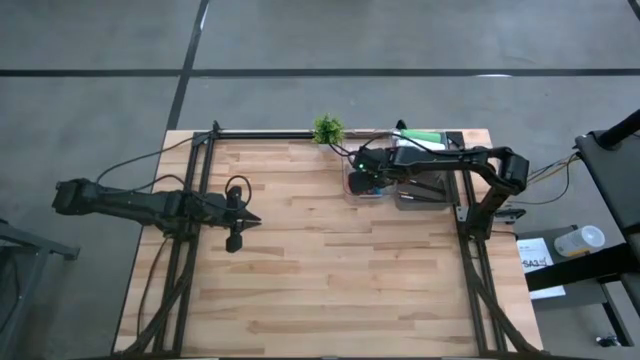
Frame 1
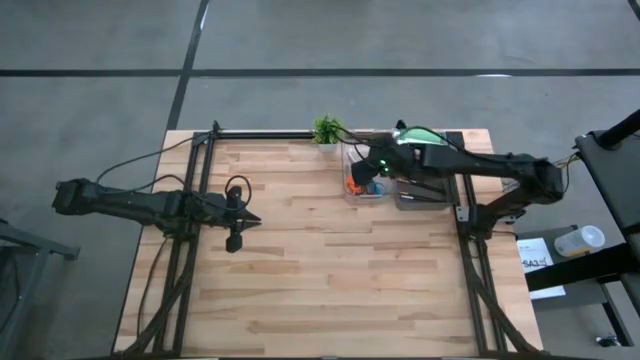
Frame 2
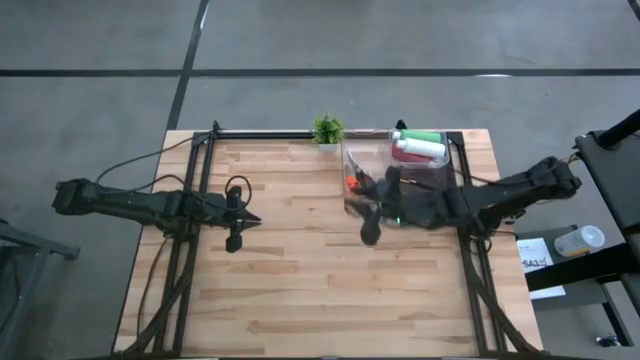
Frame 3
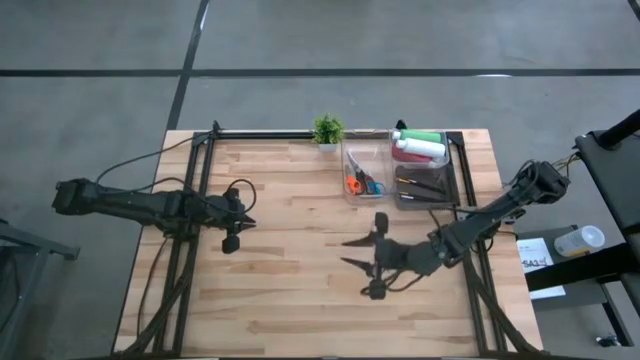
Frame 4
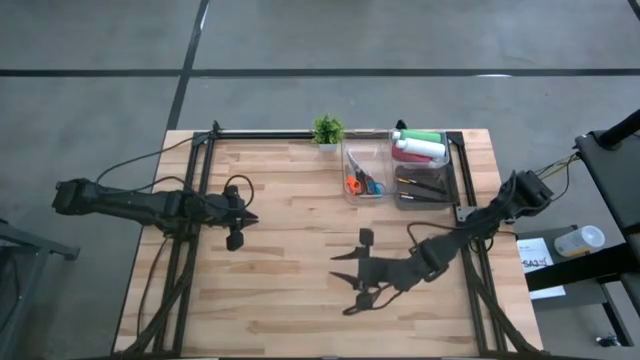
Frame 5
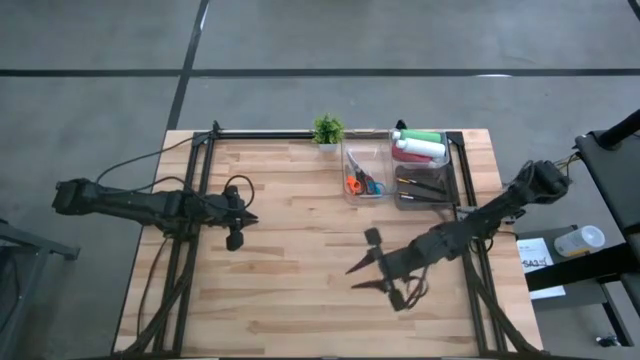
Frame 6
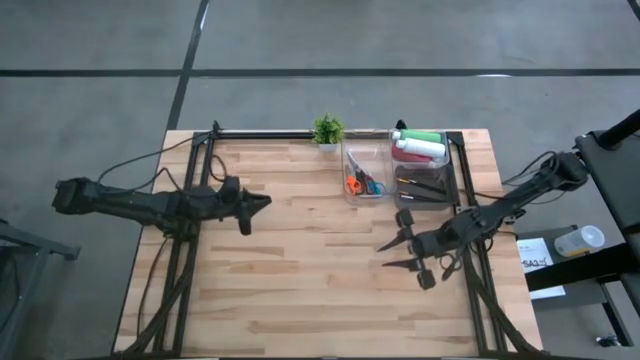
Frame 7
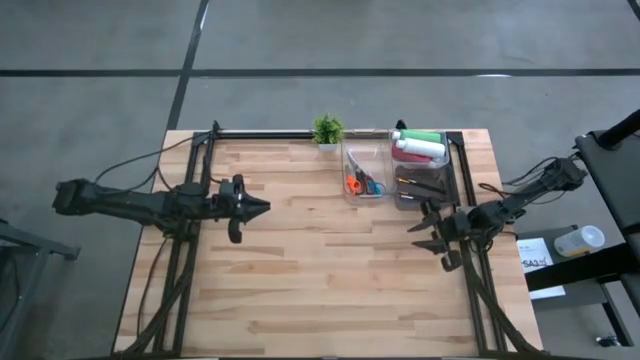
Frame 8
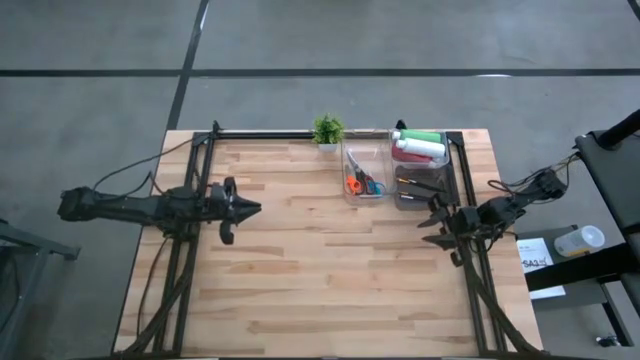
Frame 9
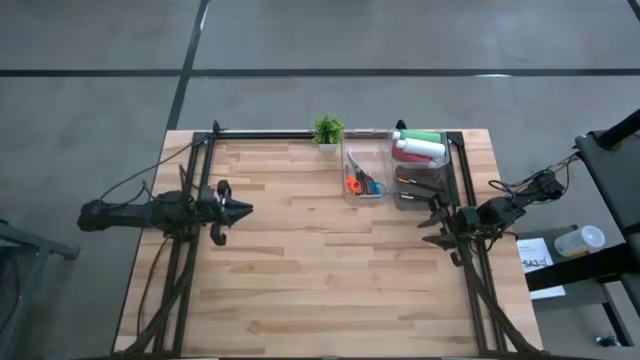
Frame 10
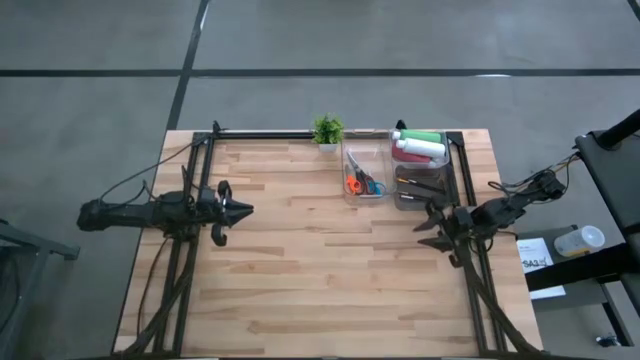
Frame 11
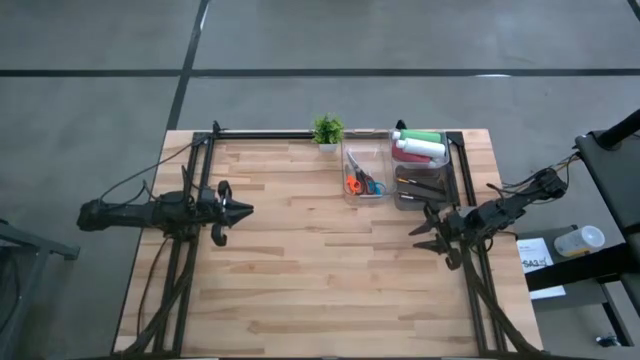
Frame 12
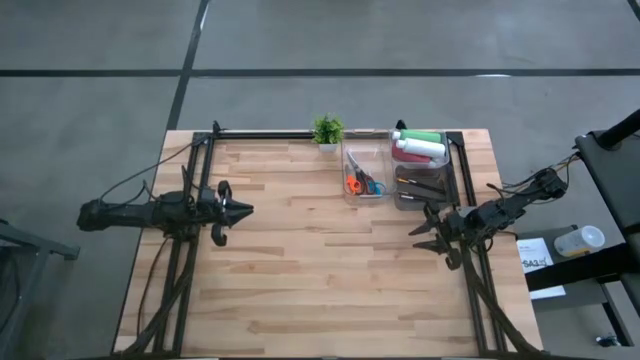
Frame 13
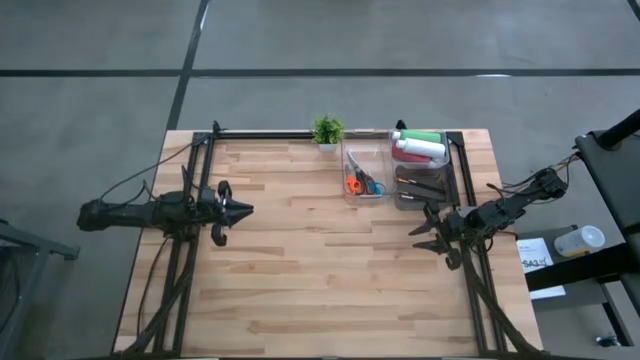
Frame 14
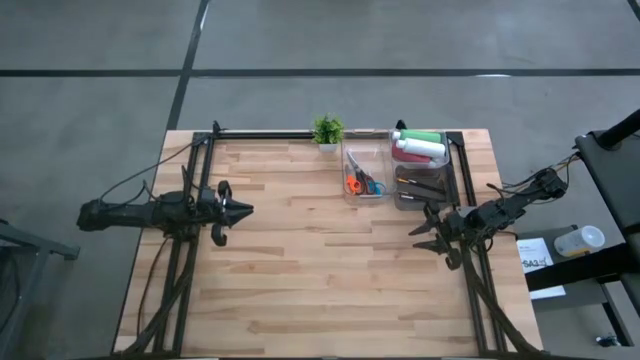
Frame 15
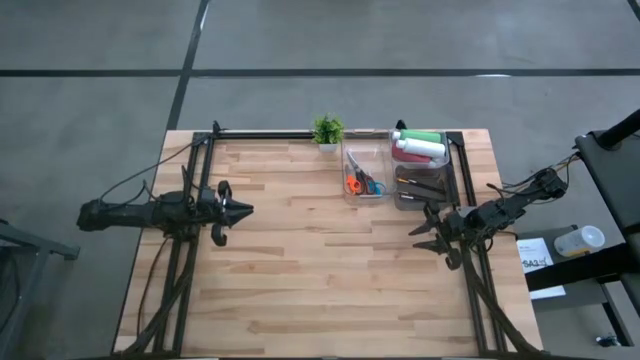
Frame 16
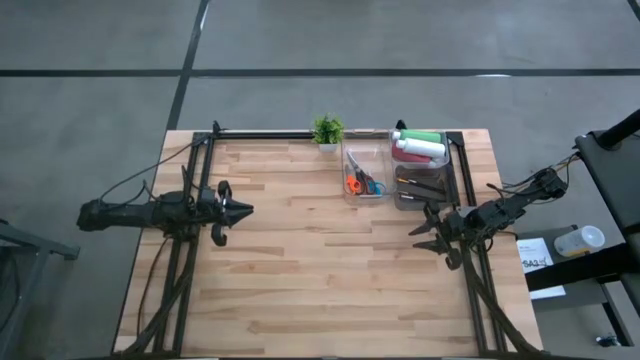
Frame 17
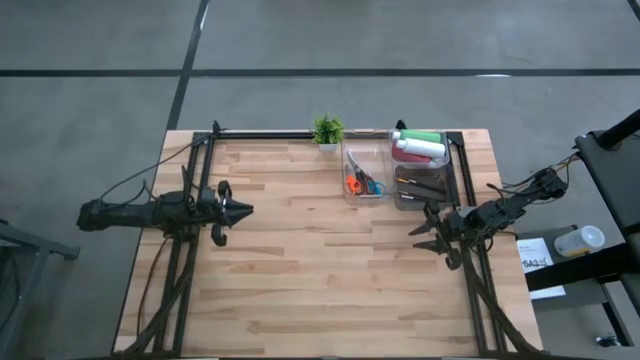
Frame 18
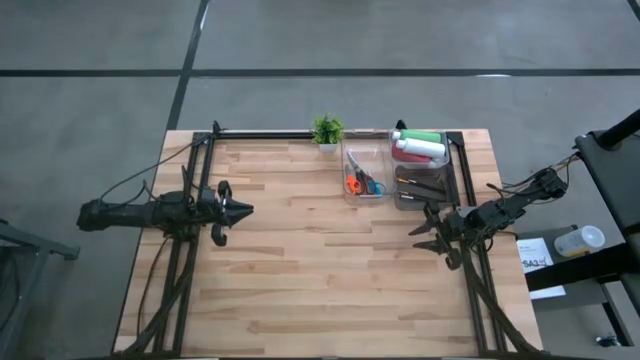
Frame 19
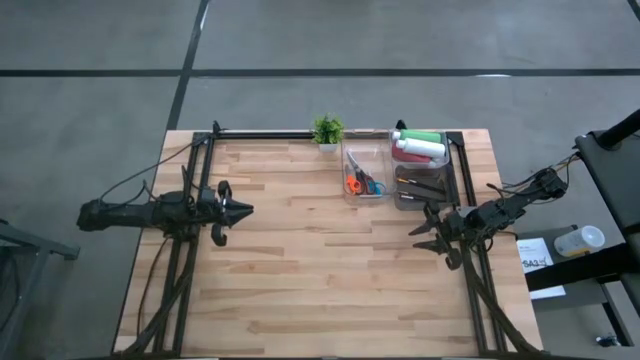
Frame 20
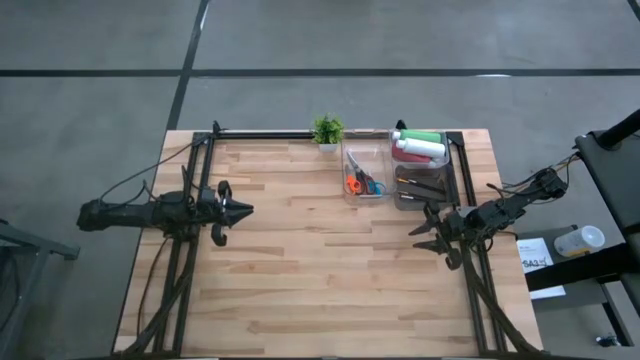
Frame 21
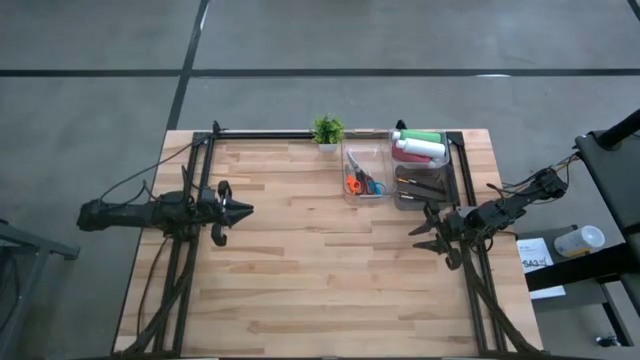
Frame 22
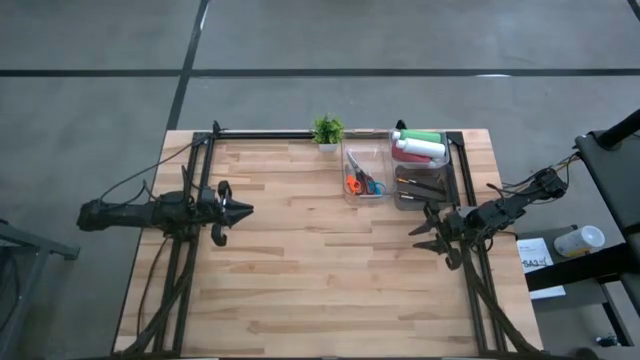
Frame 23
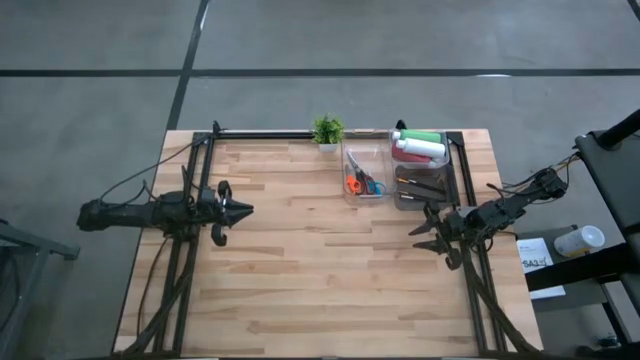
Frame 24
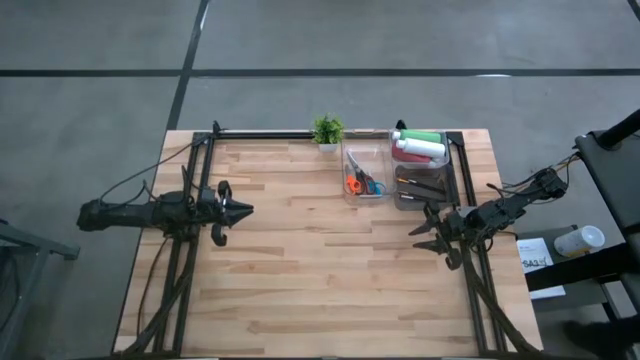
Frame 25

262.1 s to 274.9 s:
Task: Pick & Place Paint Supplies
Return to Home Position

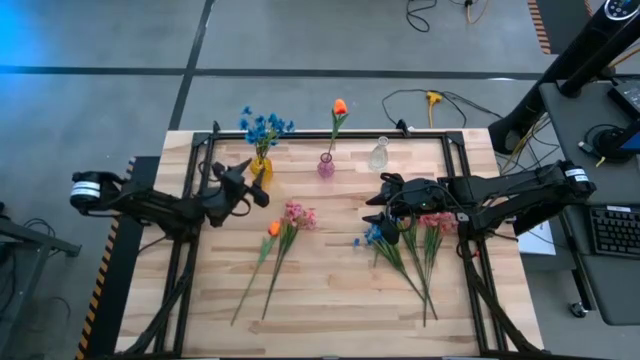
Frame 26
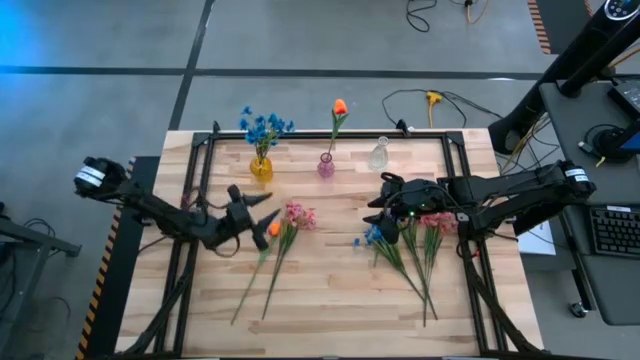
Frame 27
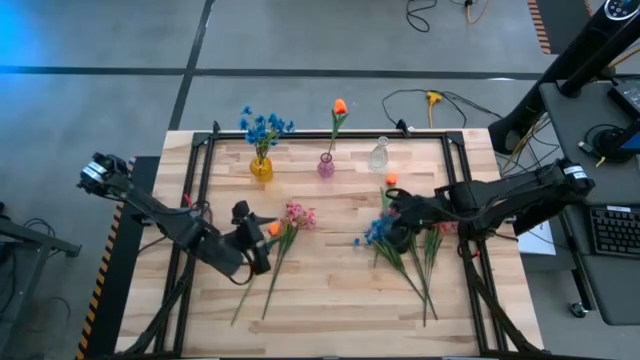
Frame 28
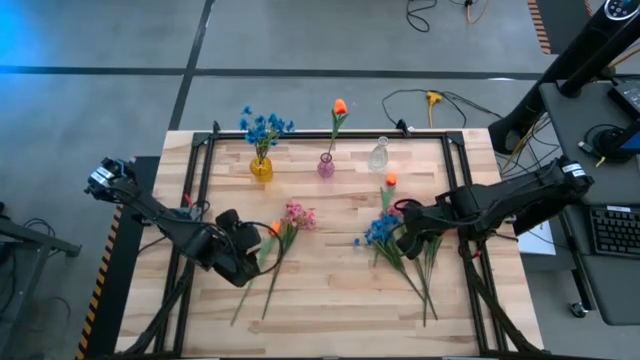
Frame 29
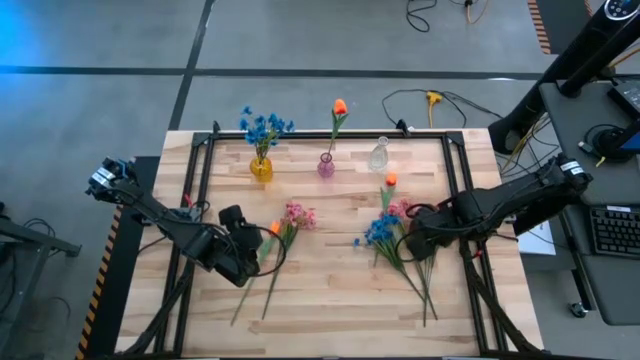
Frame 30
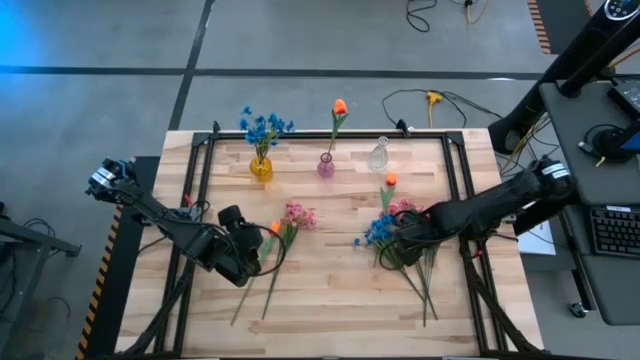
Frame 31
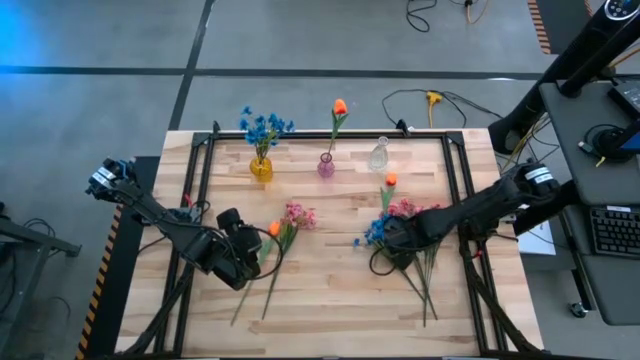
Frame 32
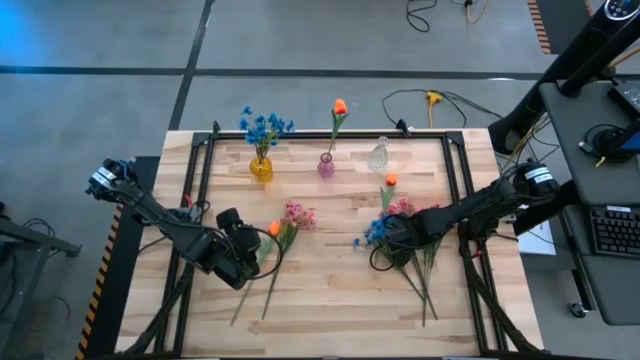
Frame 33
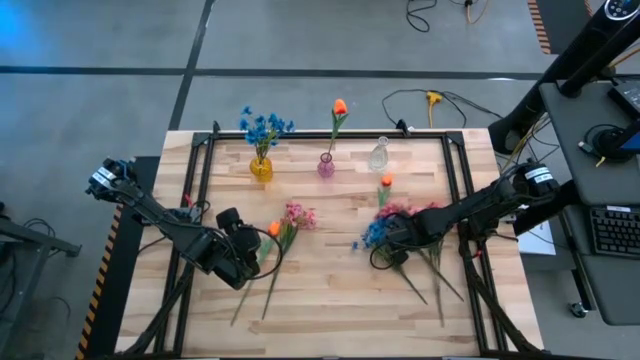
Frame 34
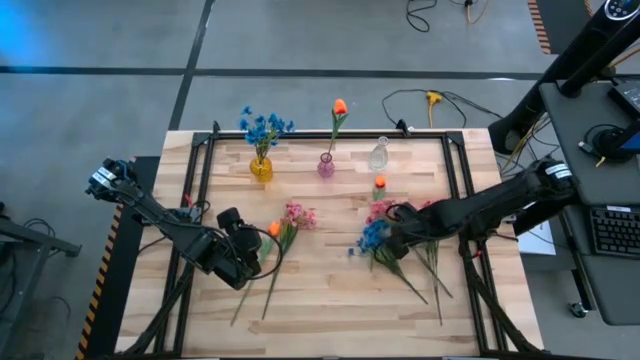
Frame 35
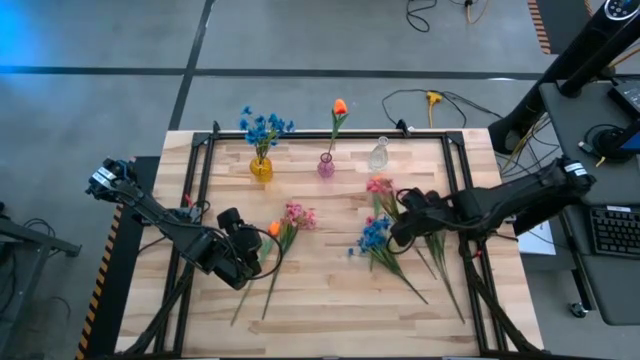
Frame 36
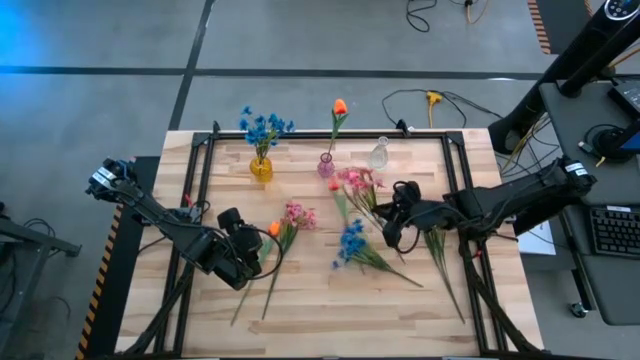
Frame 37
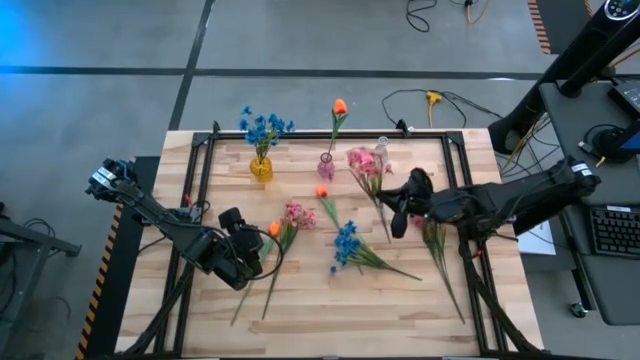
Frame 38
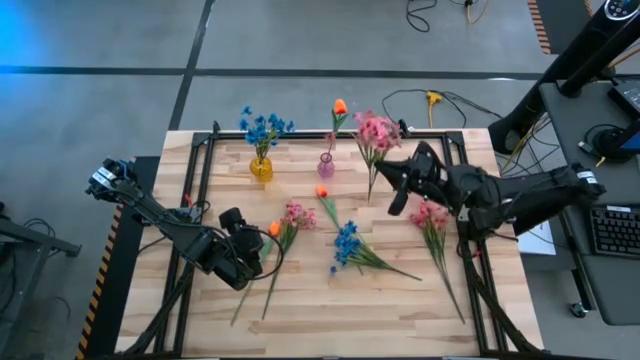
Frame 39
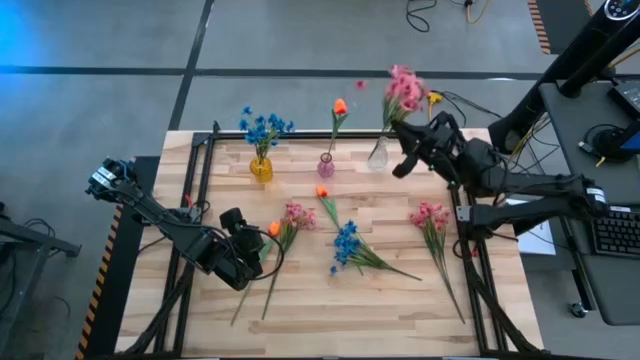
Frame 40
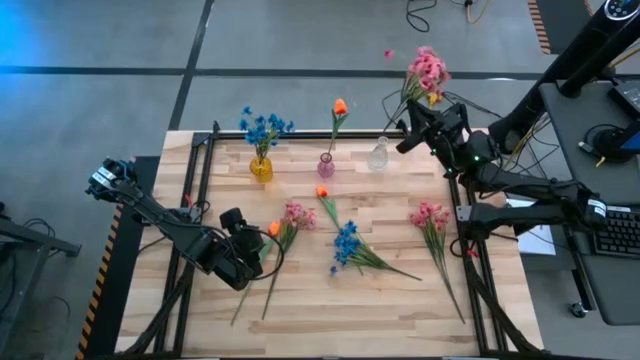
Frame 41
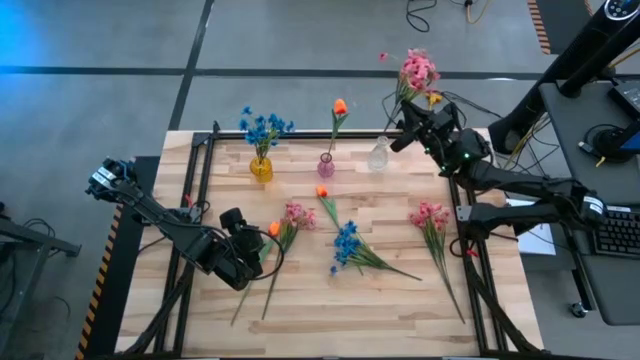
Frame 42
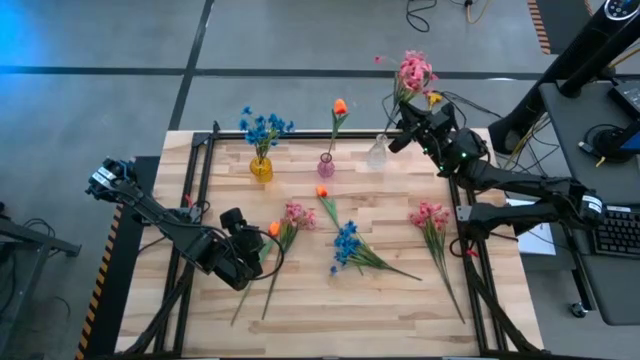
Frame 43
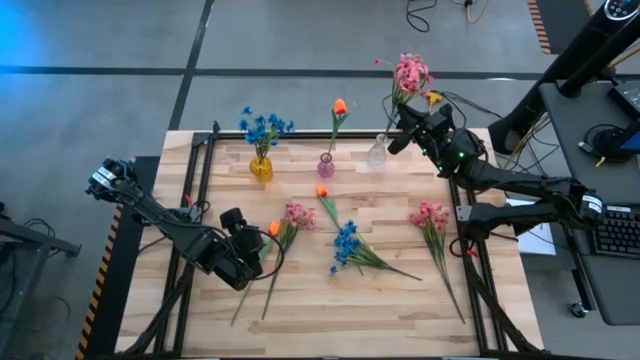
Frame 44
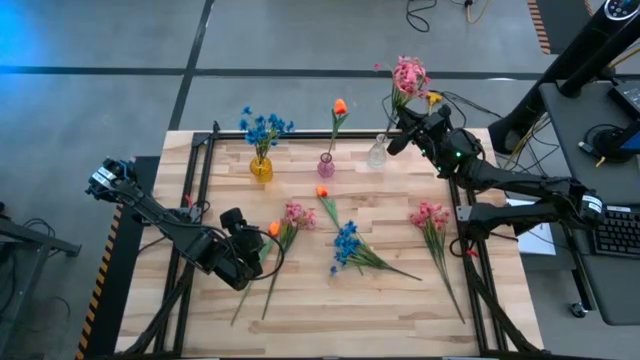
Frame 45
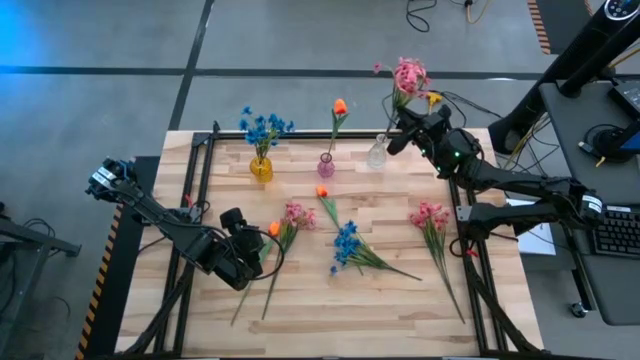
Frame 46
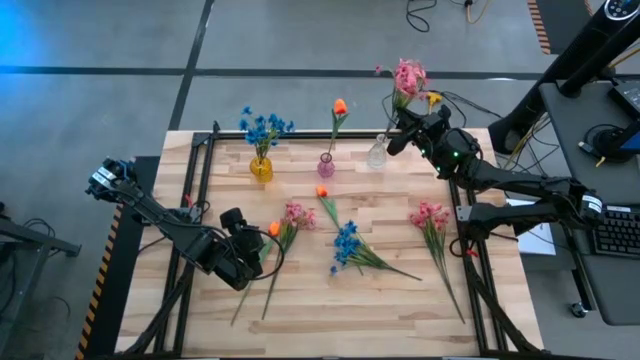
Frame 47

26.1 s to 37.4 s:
Task: Sort flowers into vase by color
Put the middle pink flowers into the transparent vase
